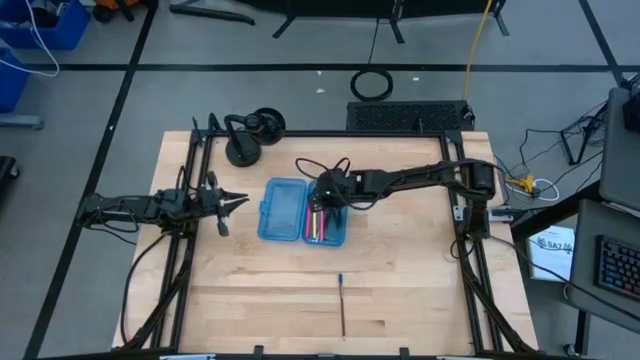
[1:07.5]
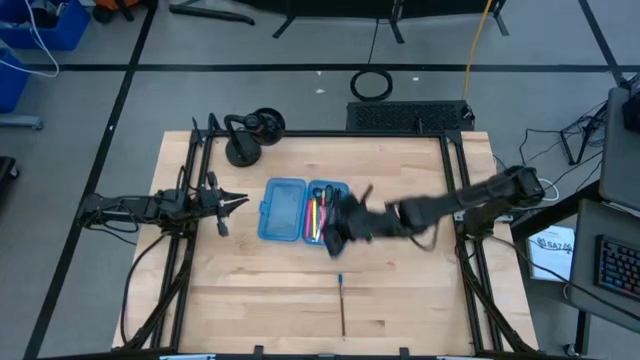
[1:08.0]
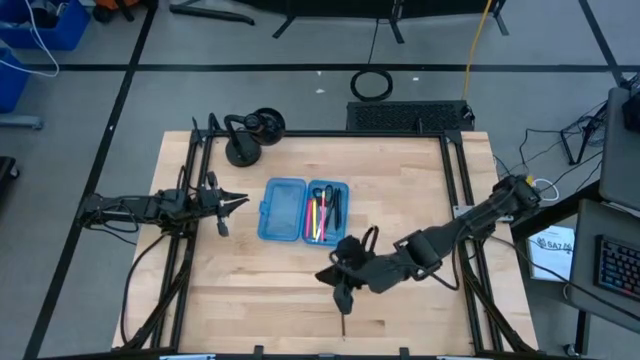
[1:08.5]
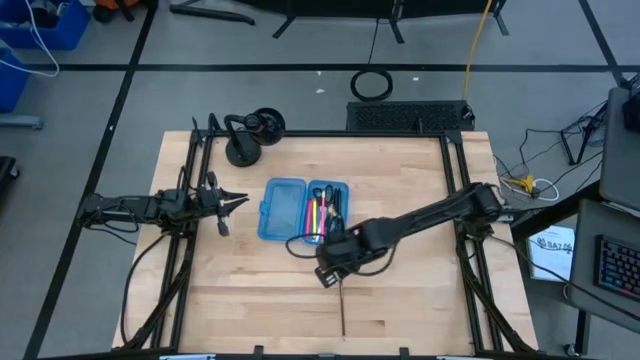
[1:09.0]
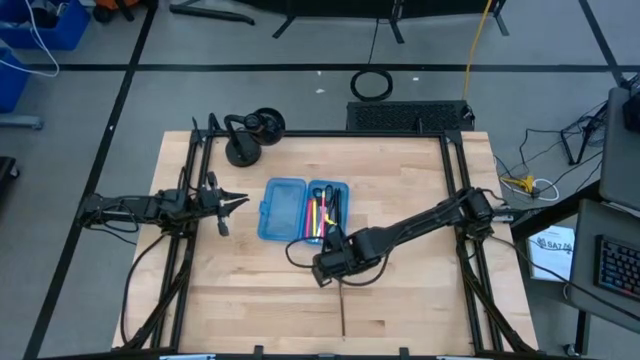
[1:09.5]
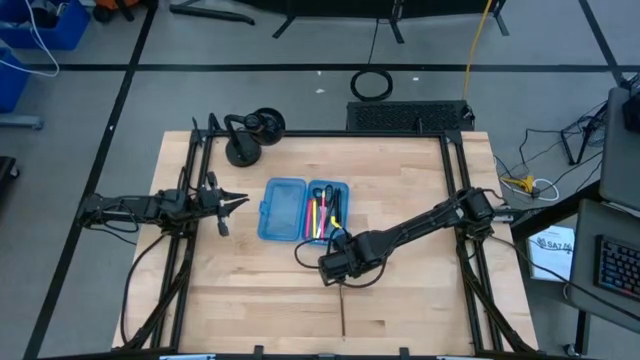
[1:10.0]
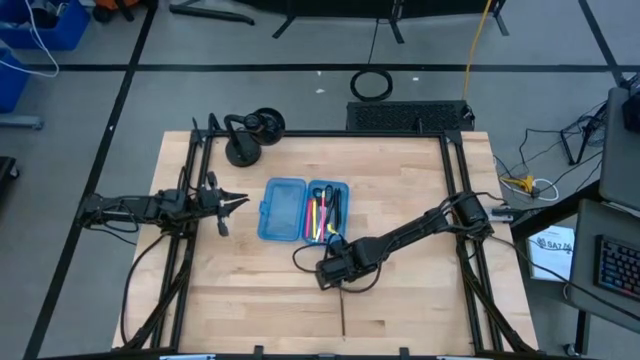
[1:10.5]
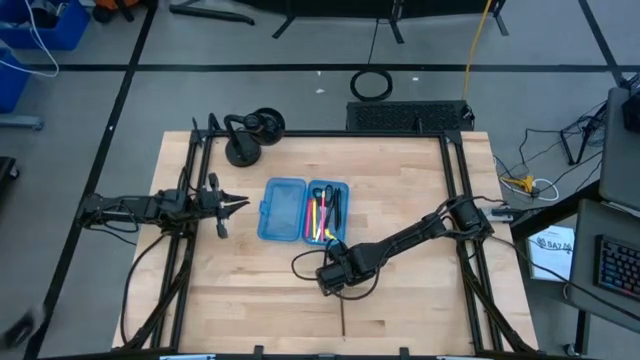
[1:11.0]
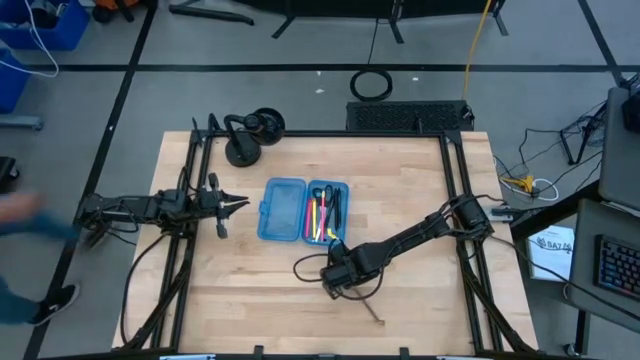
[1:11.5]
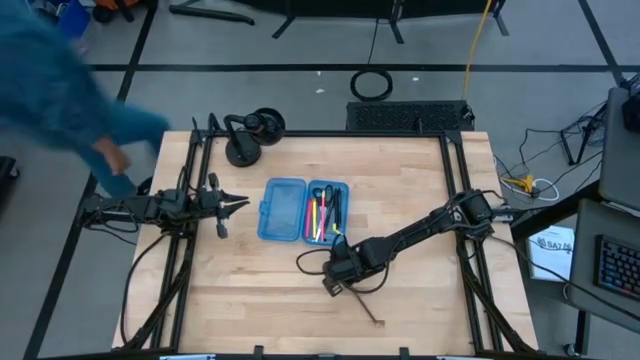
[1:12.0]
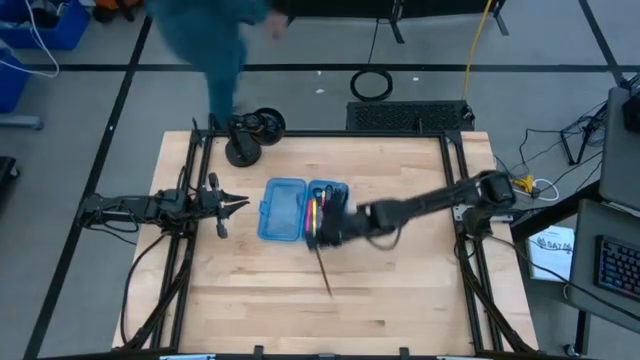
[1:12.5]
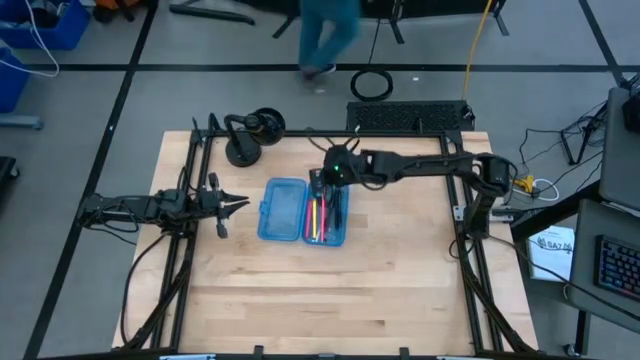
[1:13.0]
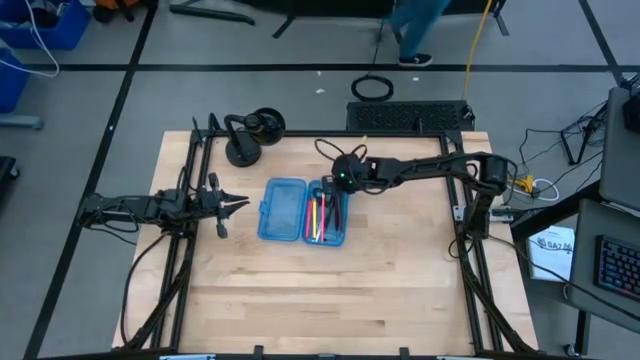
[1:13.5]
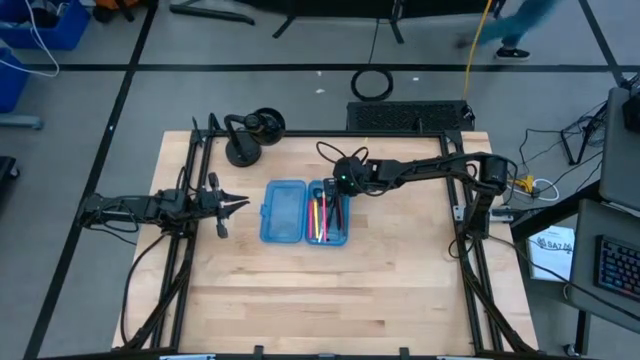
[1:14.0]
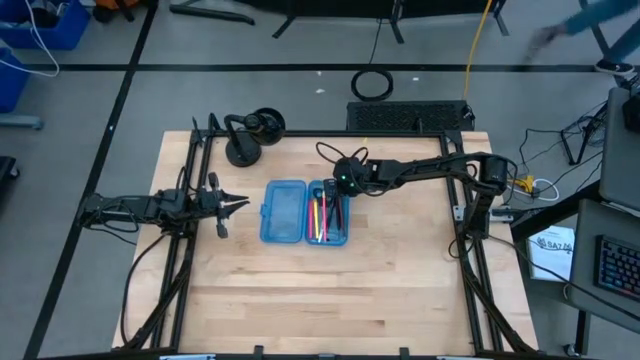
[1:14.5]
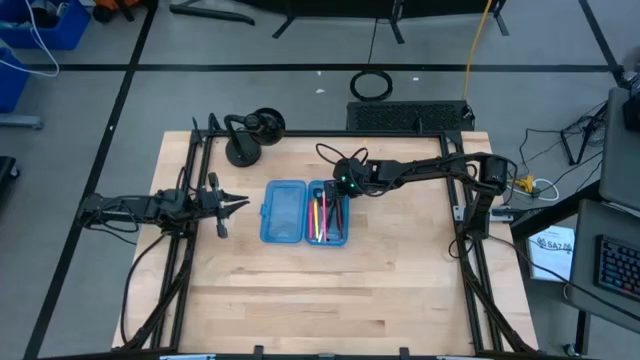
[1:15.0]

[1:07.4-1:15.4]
Task: Pick & place school supplies into a supply box
Put the brown pencil into the blue supply box

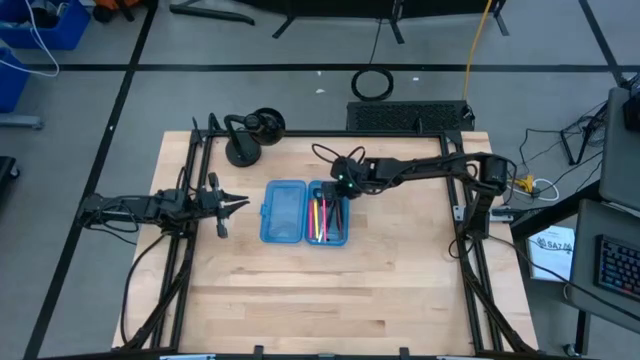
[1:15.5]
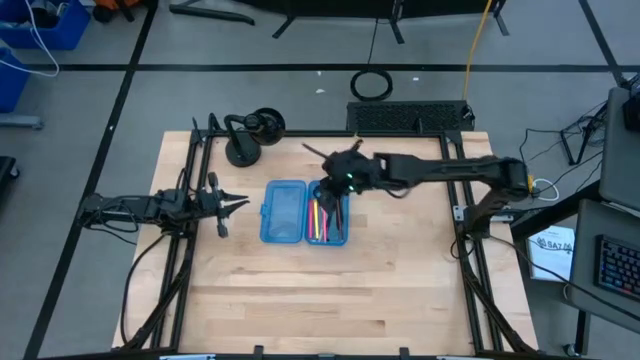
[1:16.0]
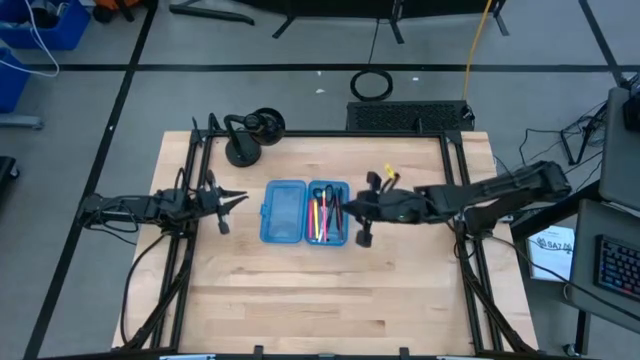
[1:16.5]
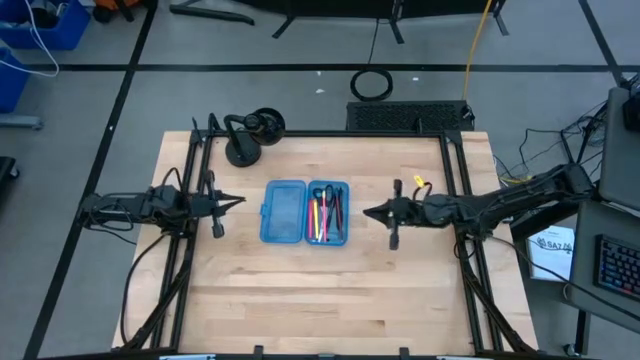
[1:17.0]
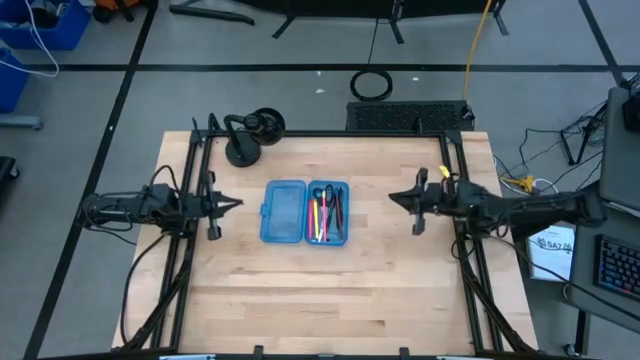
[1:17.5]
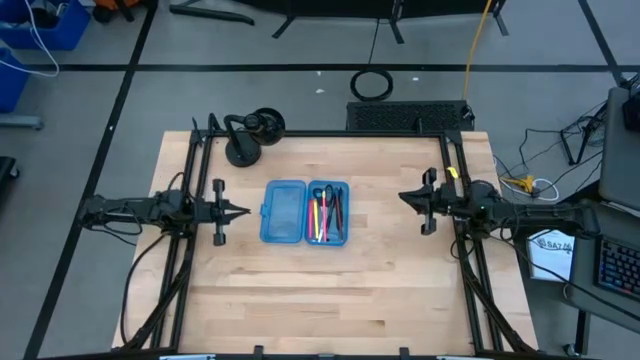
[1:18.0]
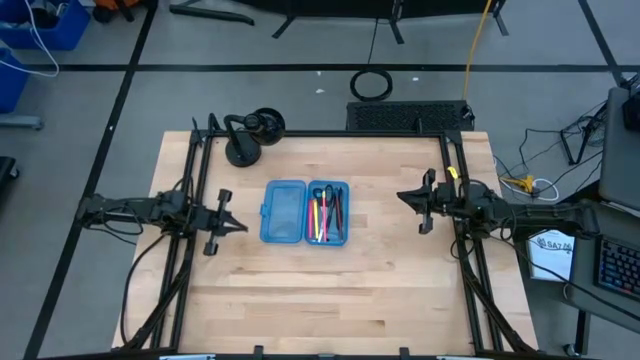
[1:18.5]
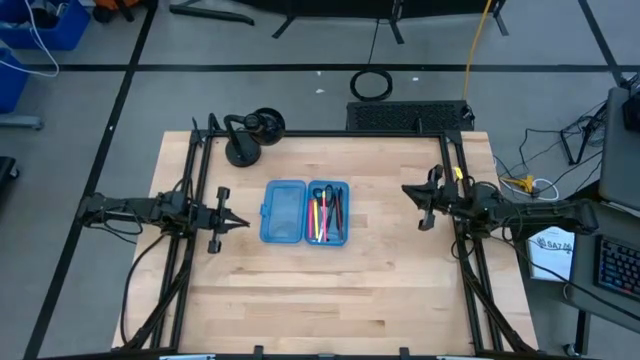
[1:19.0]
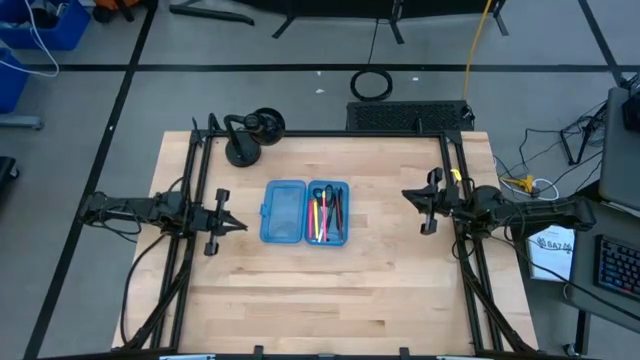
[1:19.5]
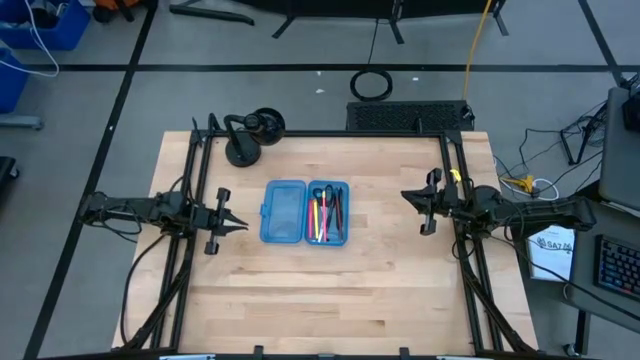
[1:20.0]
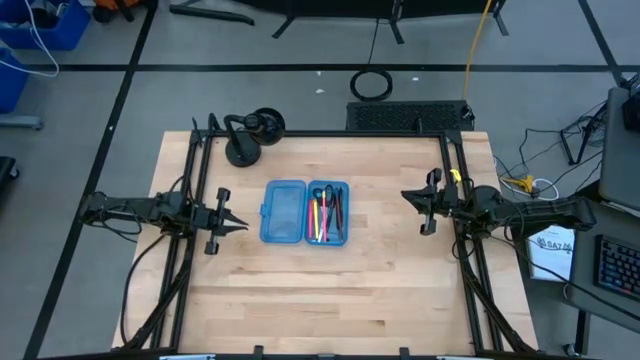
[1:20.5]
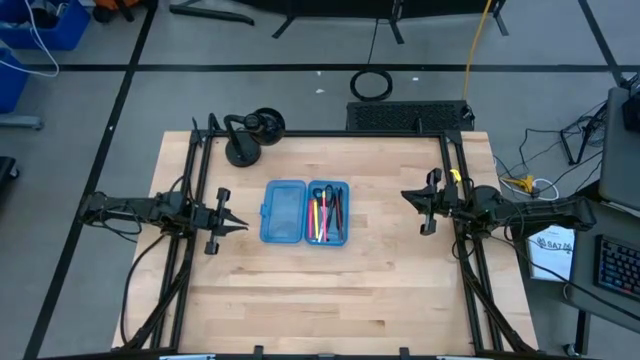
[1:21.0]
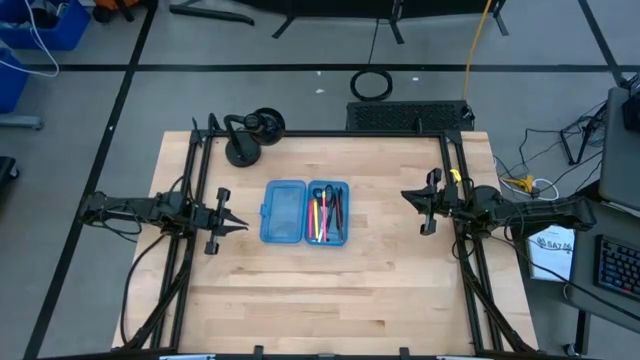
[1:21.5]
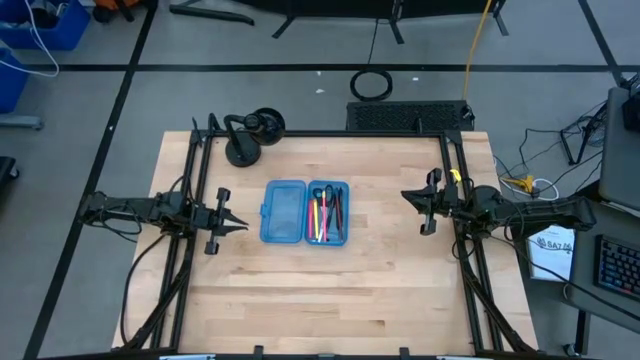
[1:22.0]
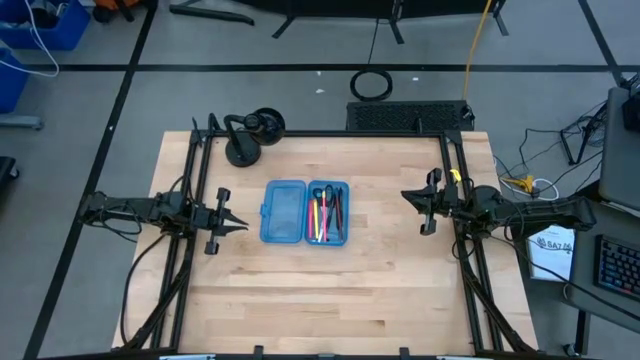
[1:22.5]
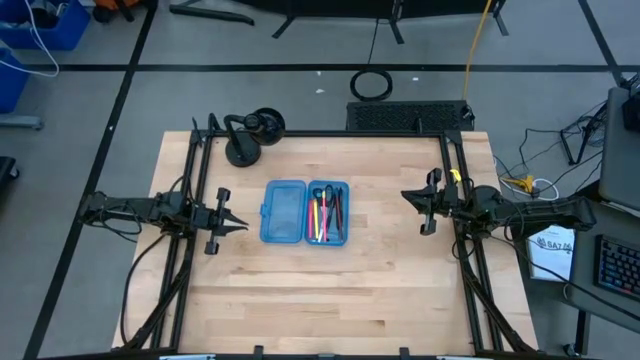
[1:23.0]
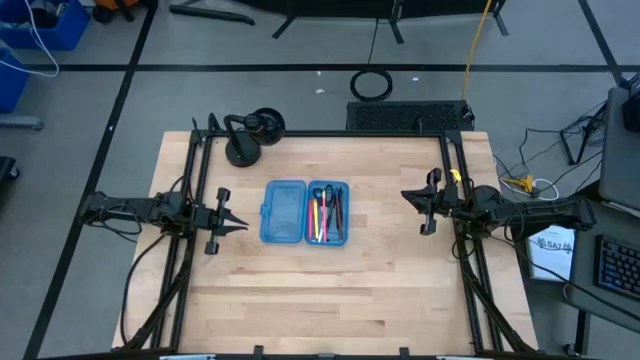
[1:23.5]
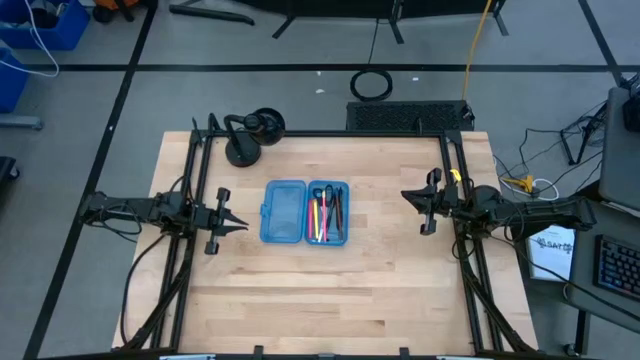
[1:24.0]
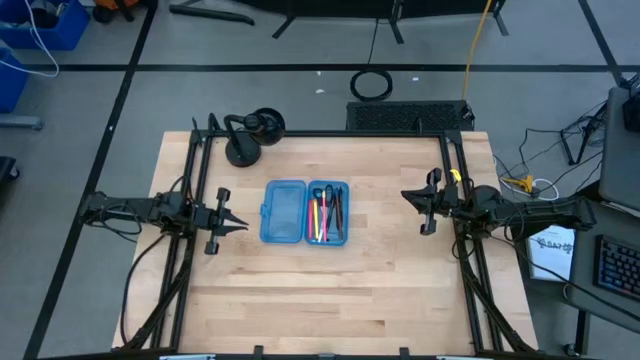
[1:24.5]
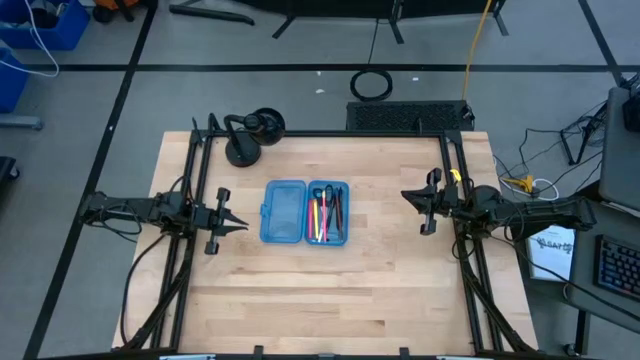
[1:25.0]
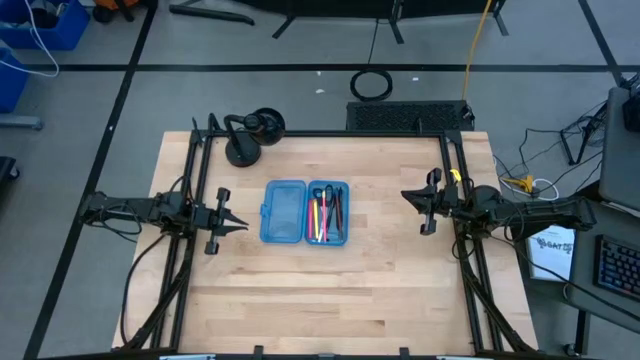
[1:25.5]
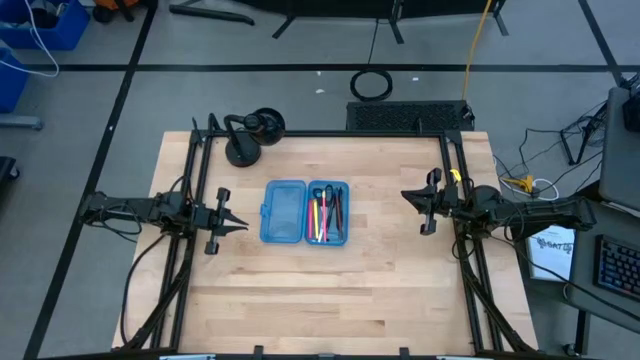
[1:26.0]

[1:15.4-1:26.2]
Return to Home Position

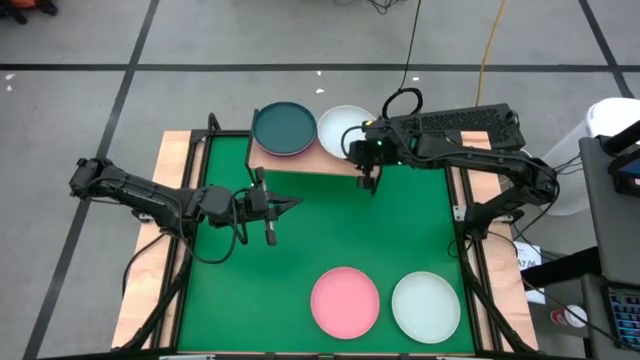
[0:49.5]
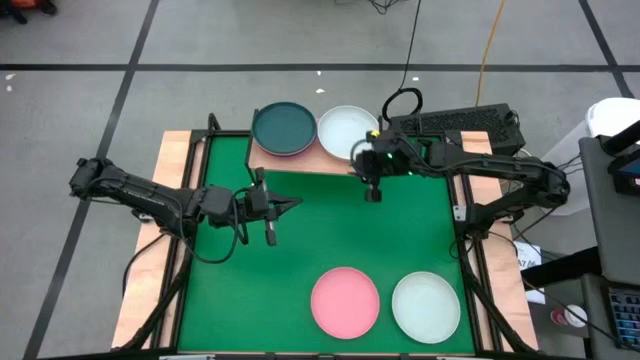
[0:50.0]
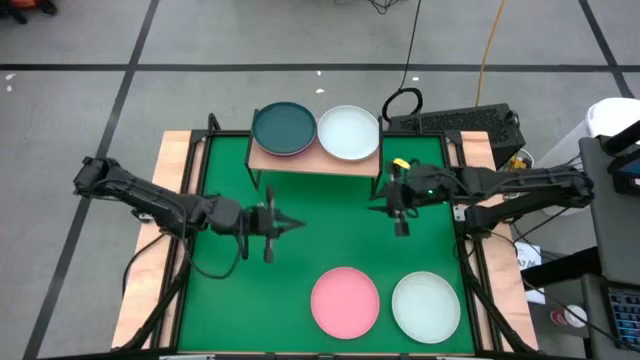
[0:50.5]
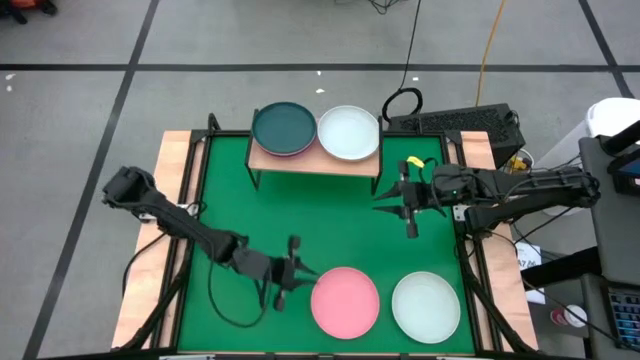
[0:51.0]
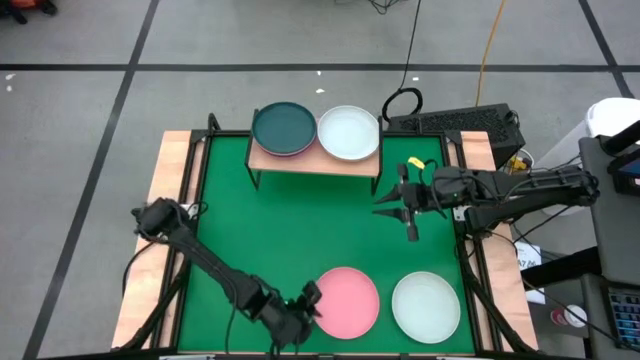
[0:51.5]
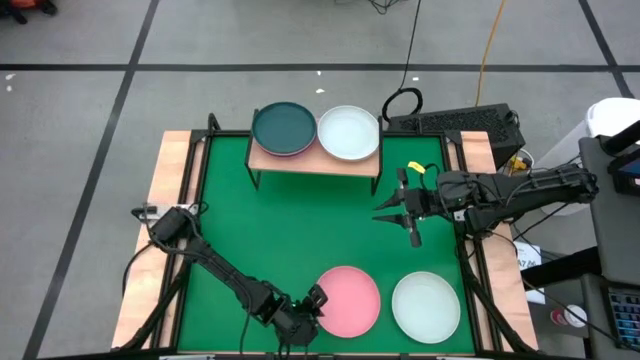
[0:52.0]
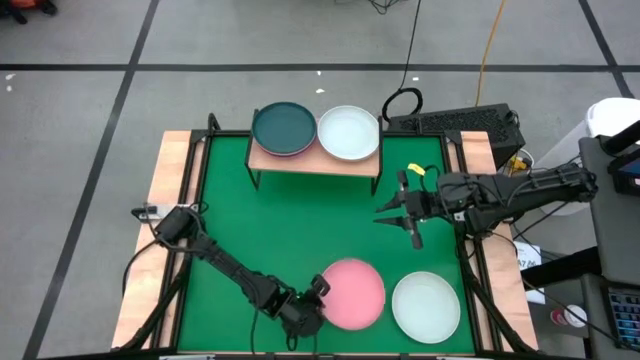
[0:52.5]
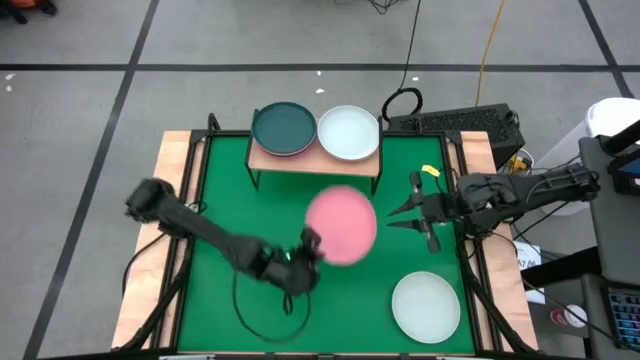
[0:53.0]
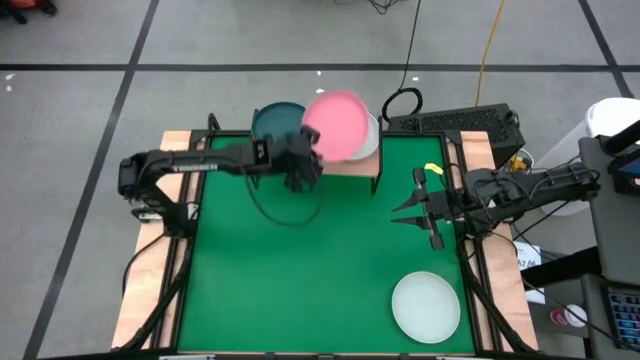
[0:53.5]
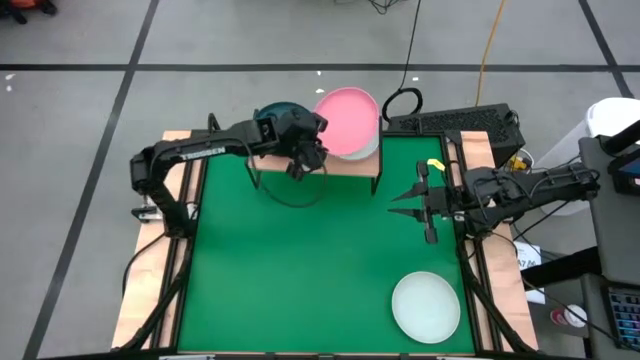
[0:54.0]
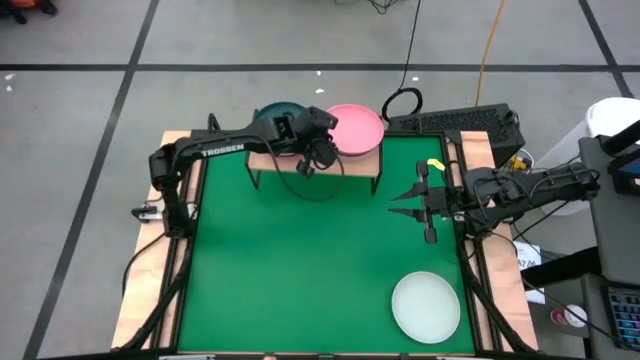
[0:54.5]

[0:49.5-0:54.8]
Task: Place and stack plates onto a shelf
Stack the pink plate on top of the blue plate on the shelf
